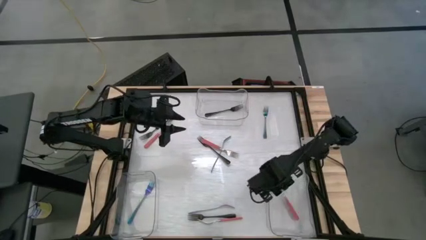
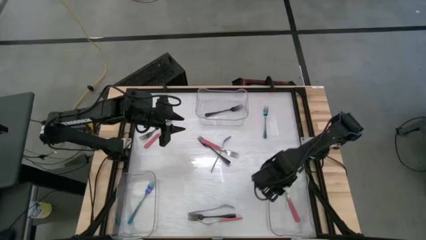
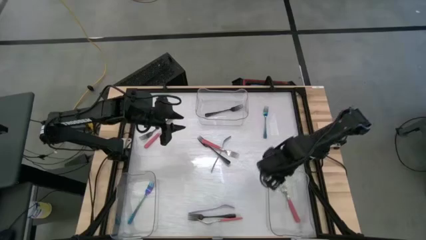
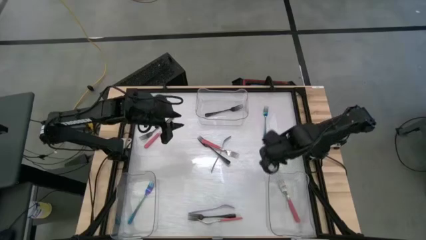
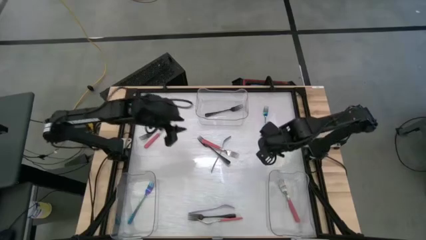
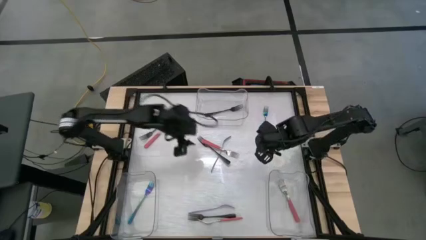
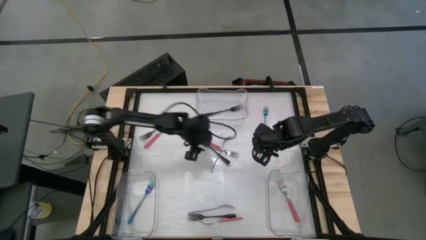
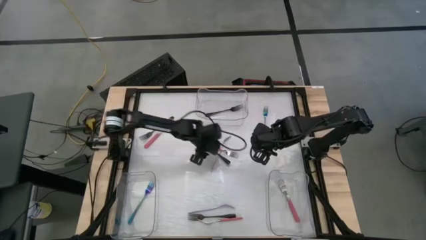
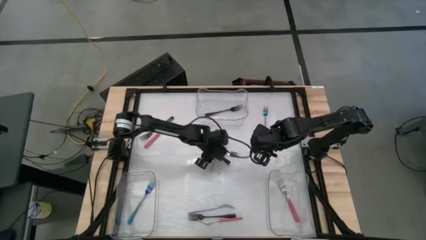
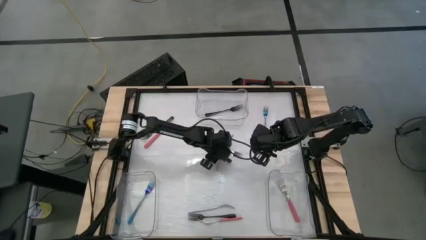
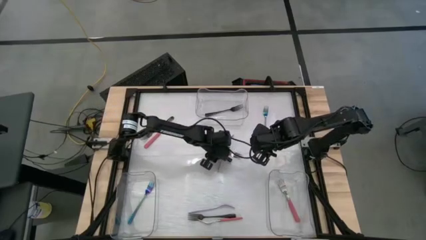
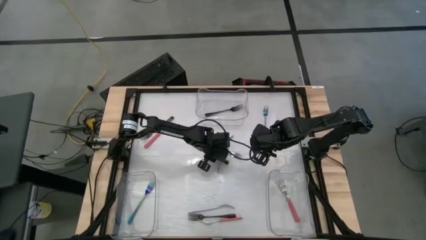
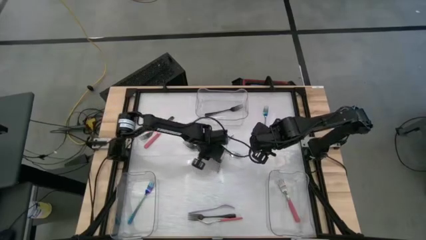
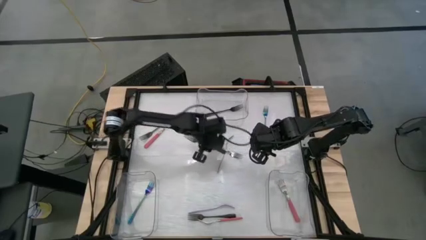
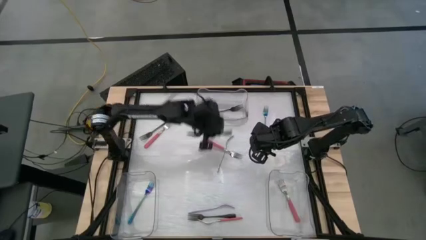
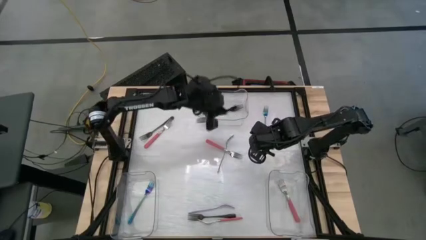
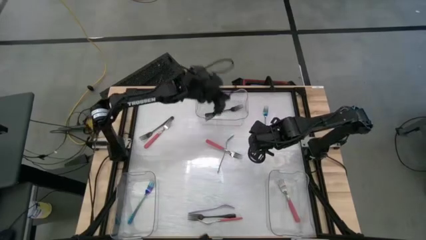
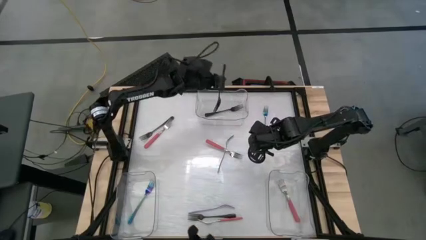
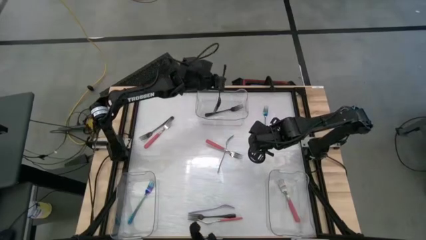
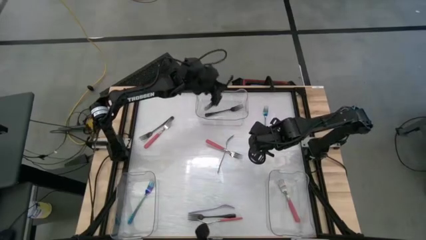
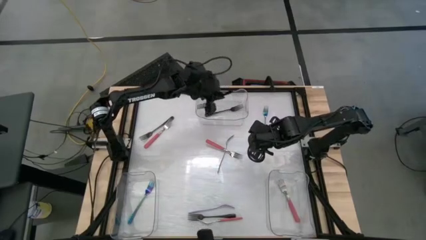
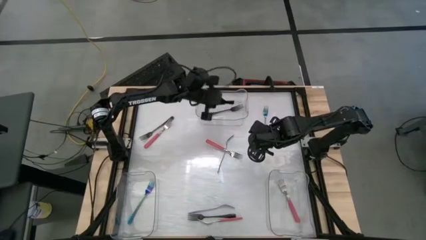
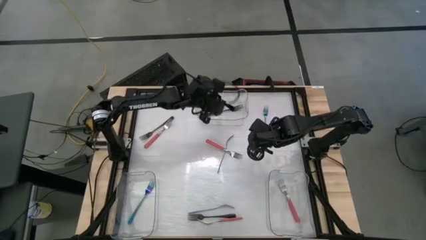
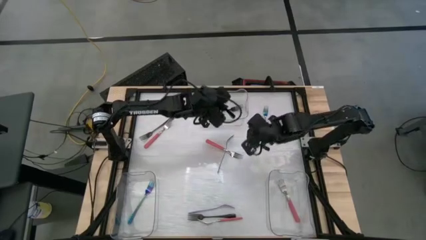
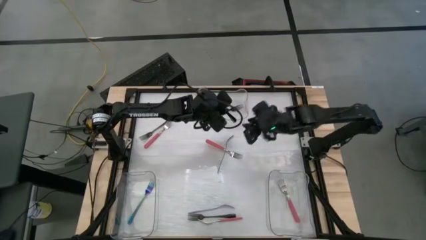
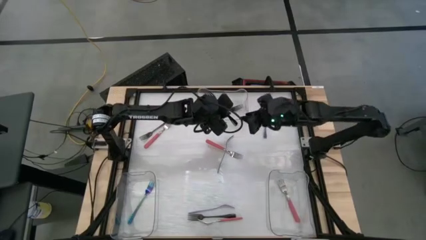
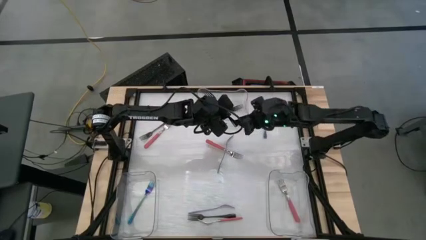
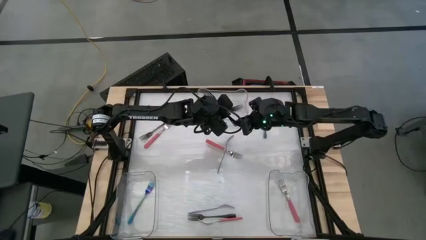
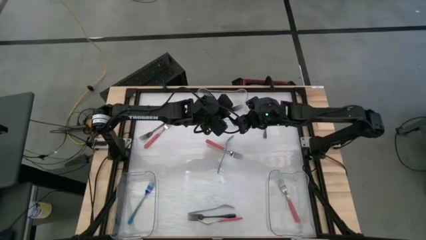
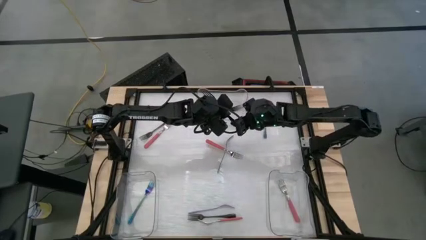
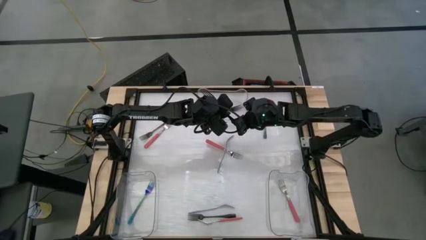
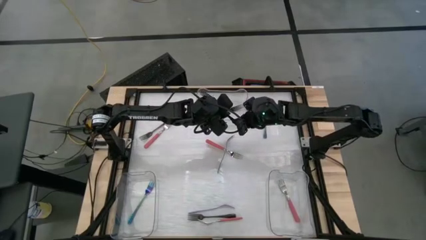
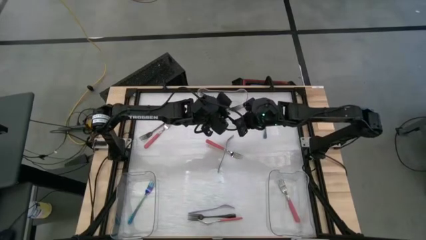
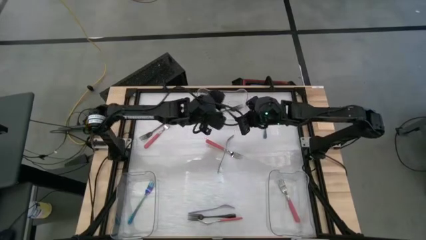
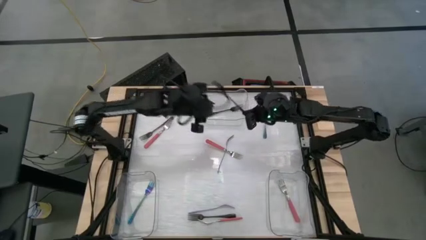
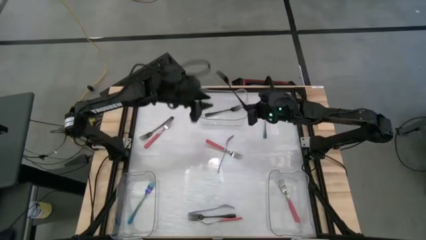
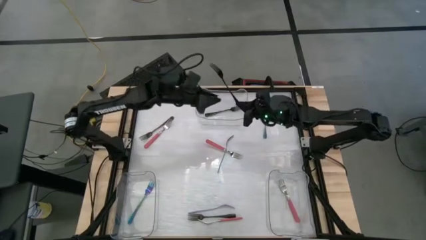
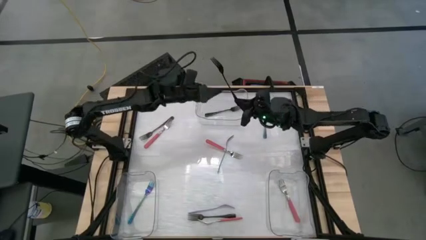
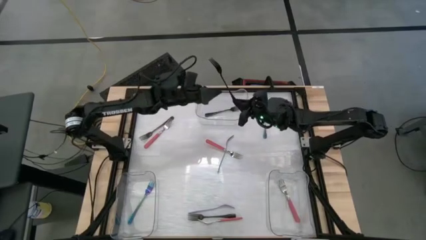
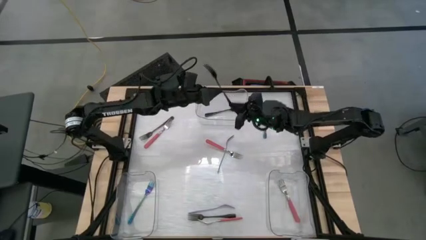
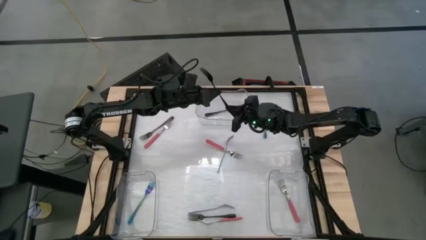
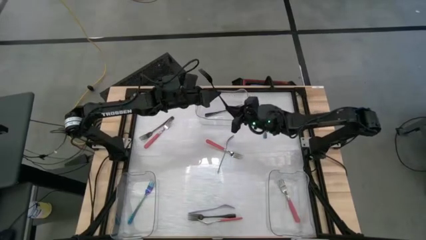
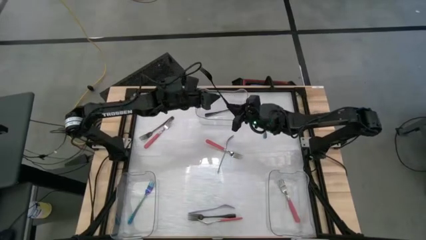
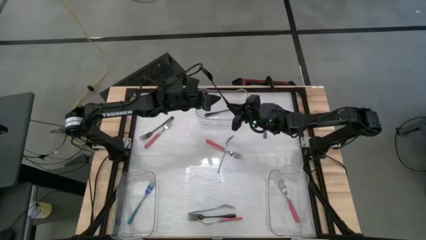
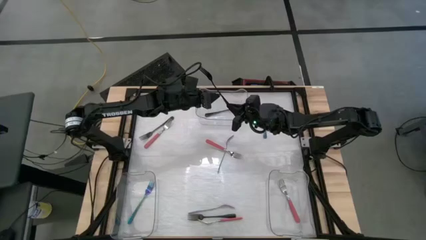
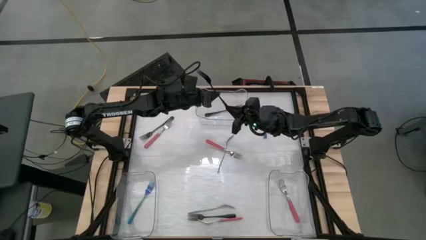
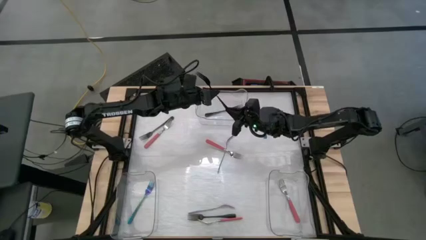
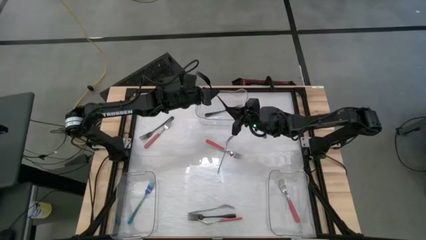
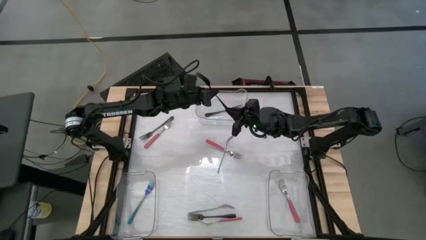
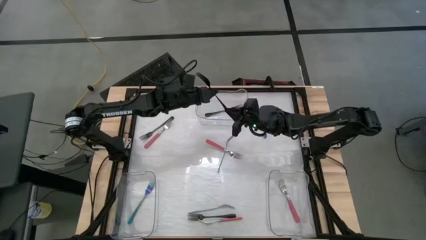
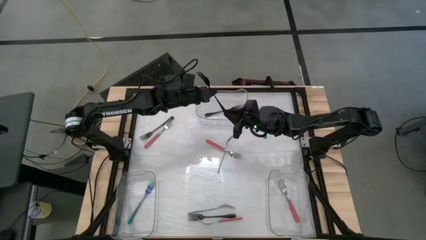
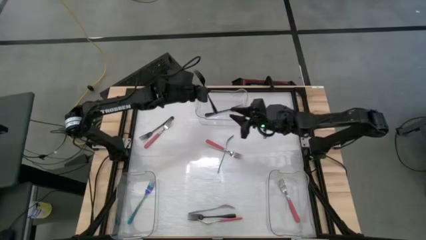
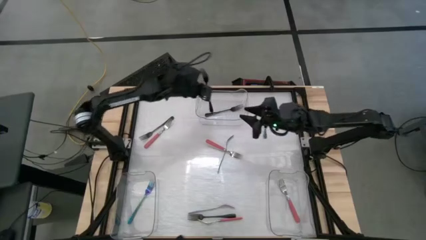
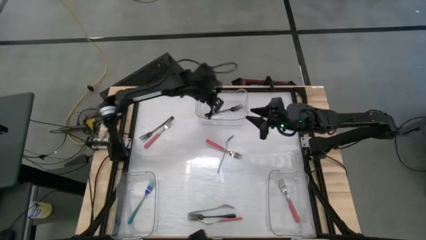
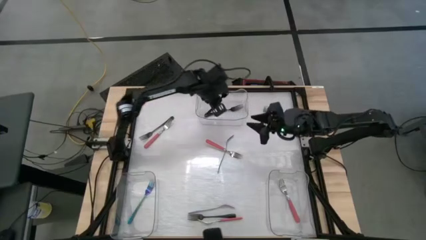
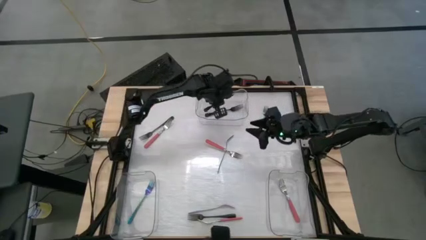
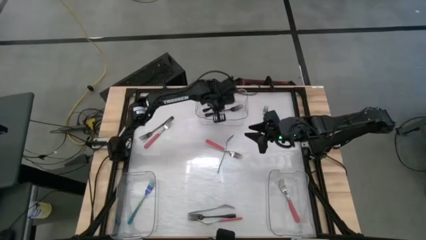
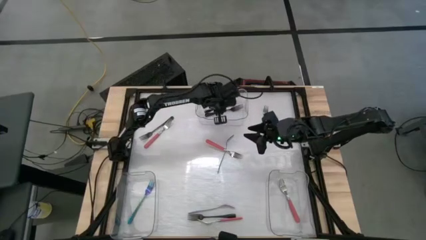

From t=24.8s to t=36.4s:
Task: Sort silverware by color (type)
Put the black fork into the top transparent bin

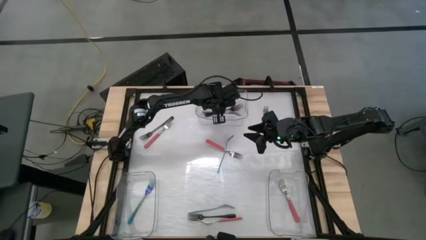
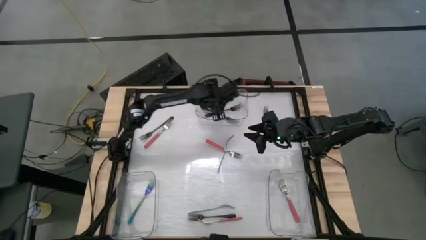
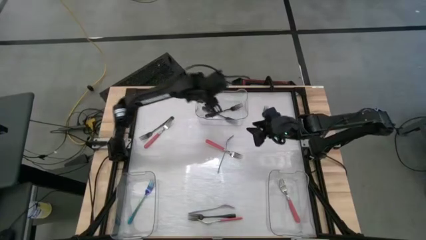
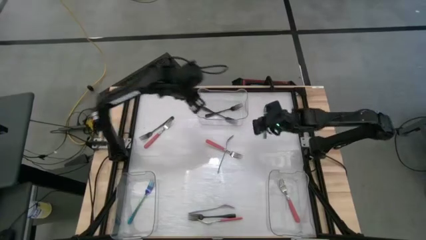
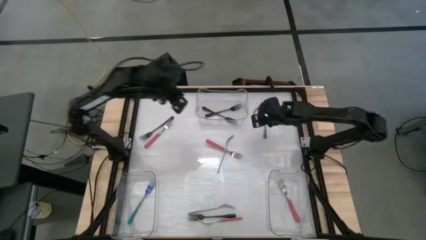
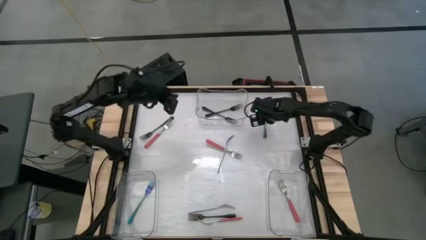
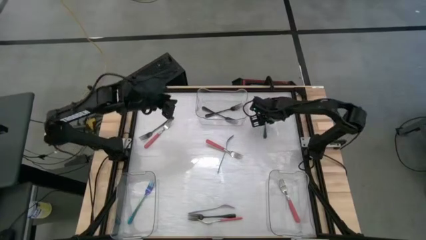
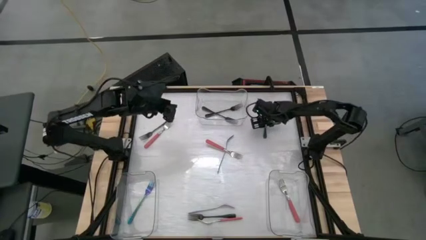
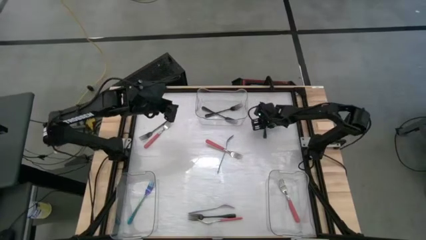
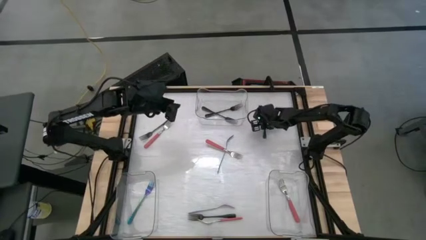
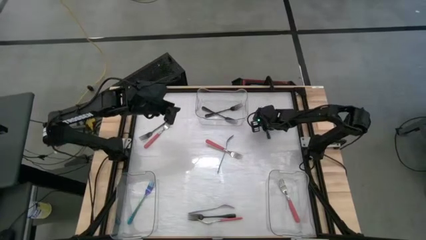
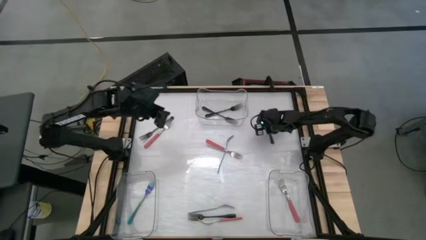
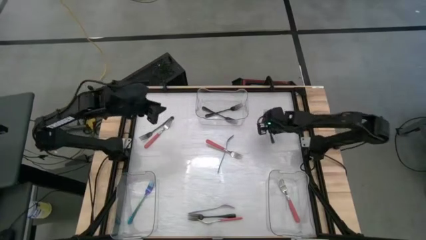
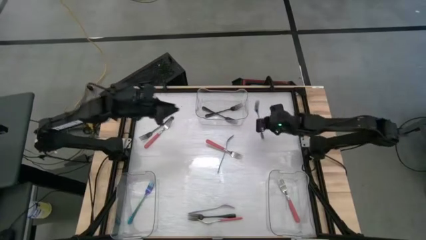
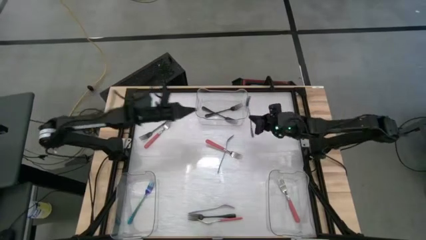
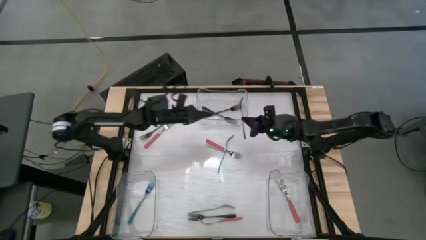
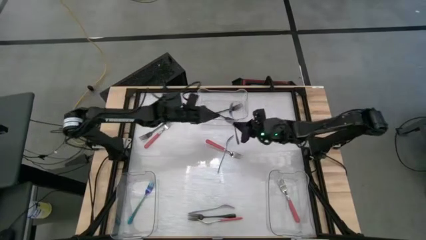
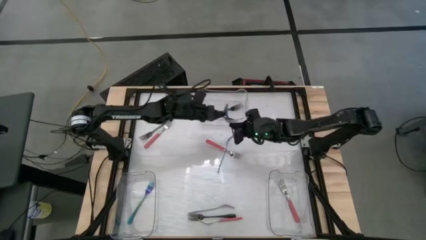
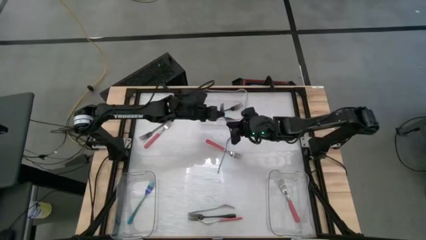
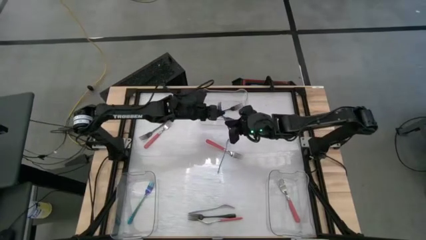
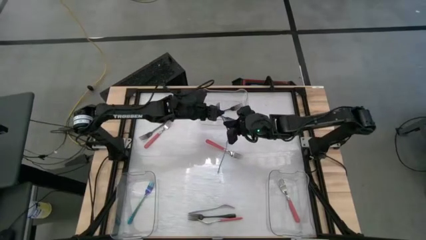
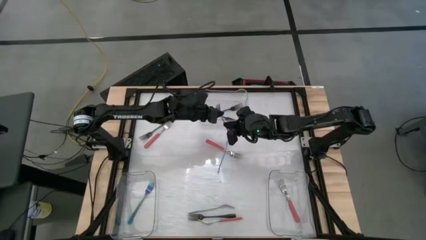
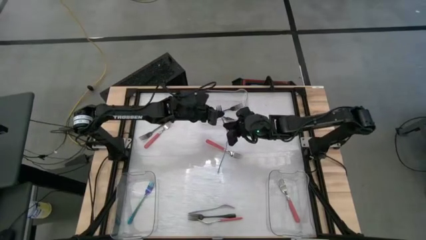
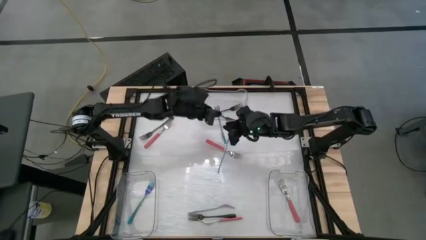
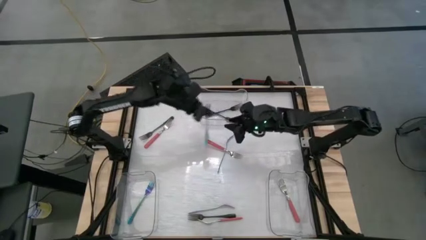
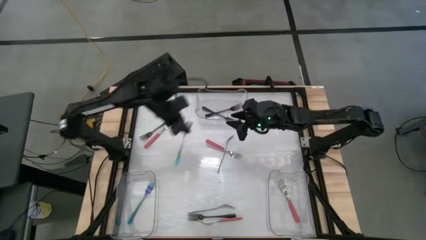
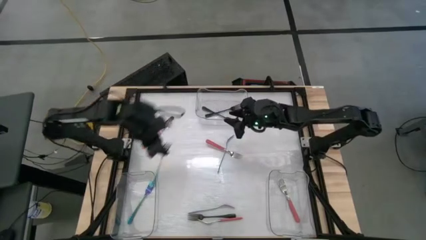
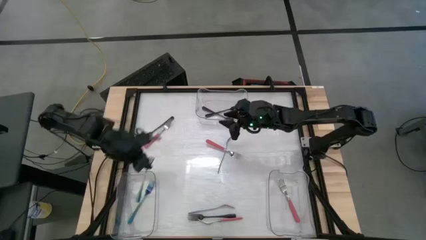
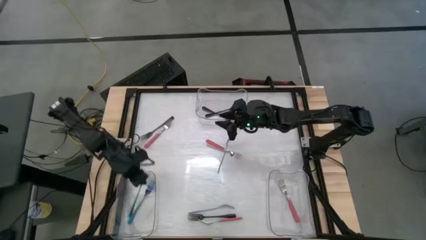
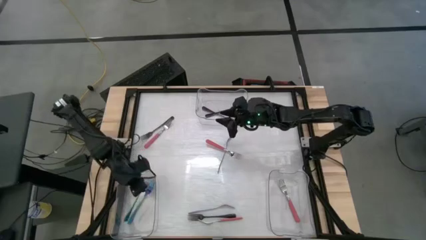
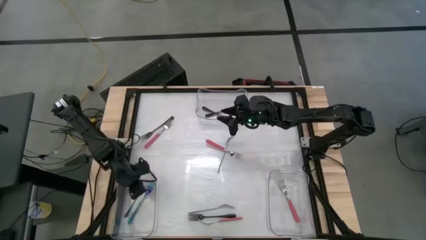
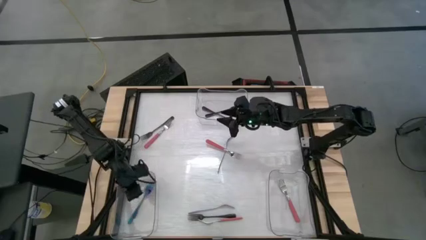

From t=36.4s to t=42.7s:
Put the blue fork into the bottom left transparent bin
